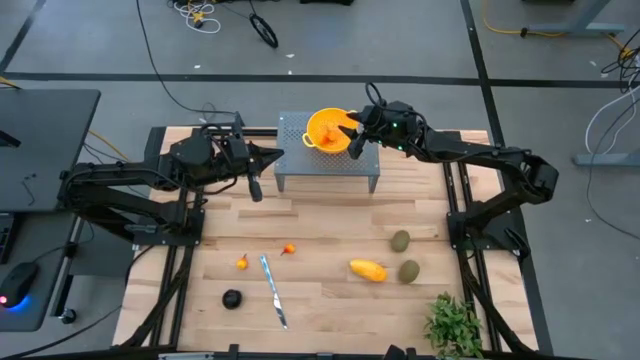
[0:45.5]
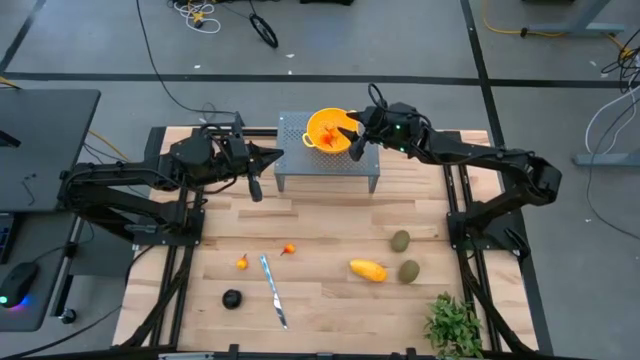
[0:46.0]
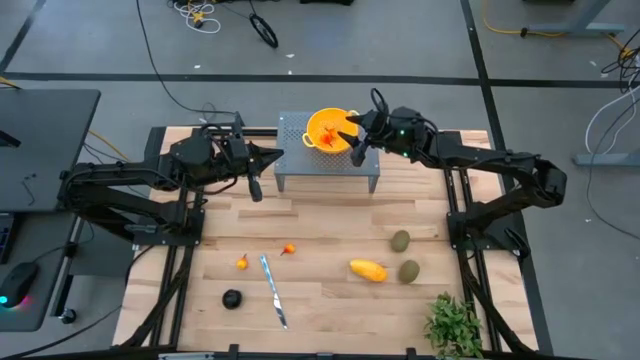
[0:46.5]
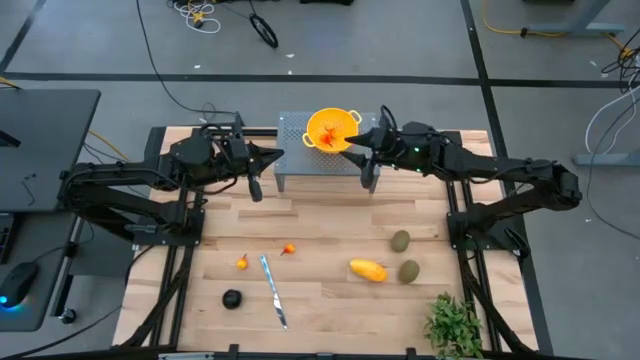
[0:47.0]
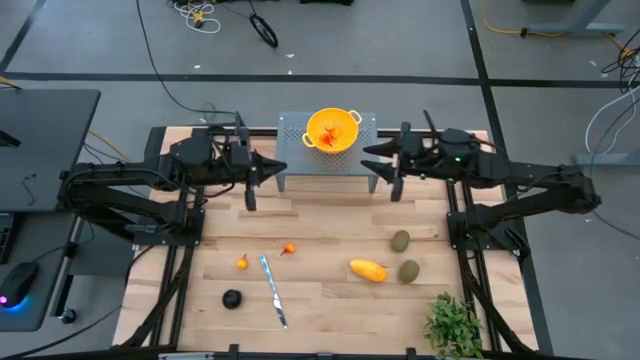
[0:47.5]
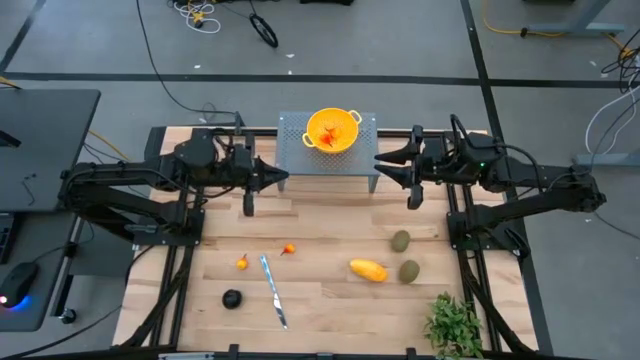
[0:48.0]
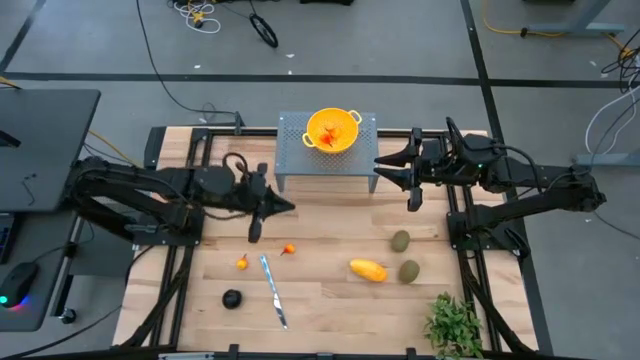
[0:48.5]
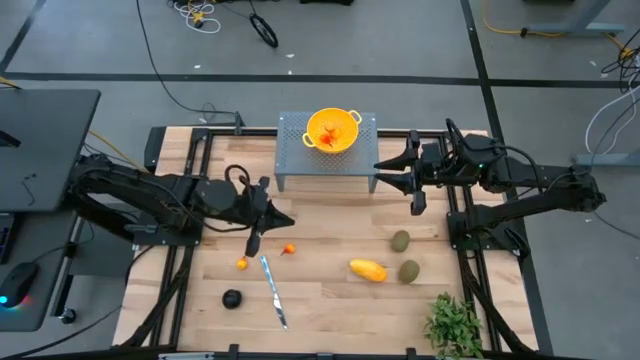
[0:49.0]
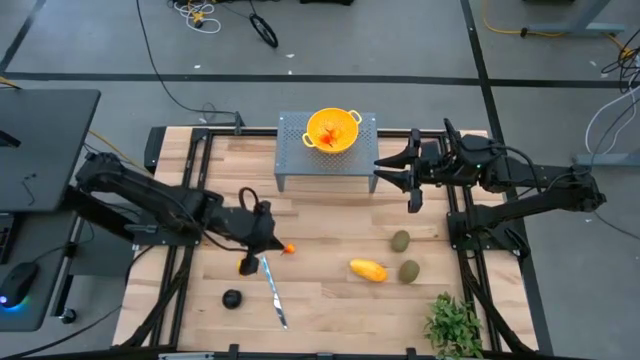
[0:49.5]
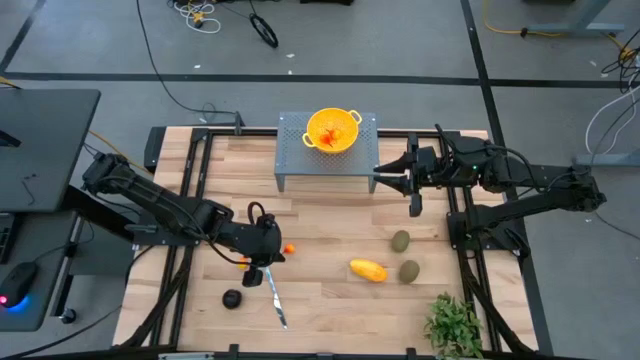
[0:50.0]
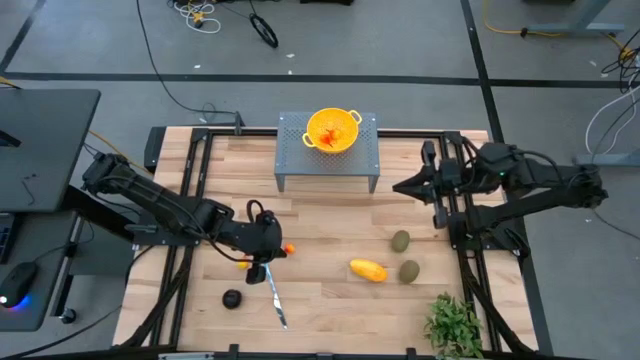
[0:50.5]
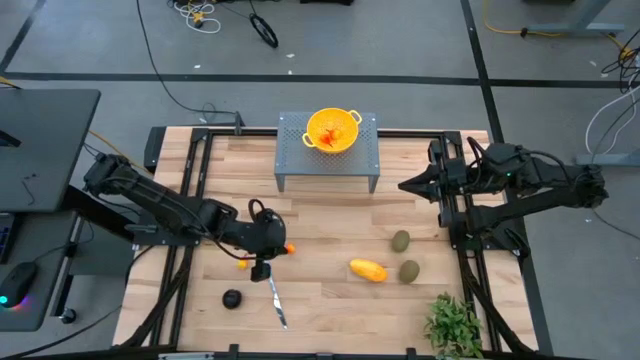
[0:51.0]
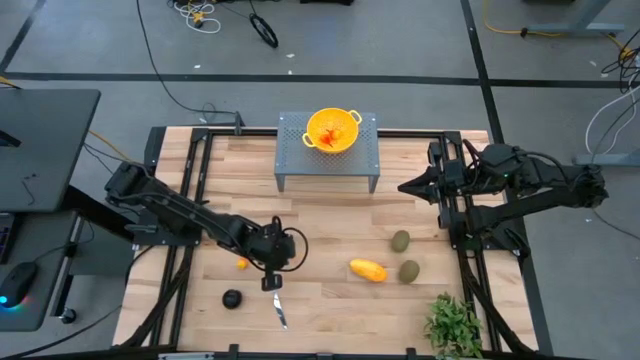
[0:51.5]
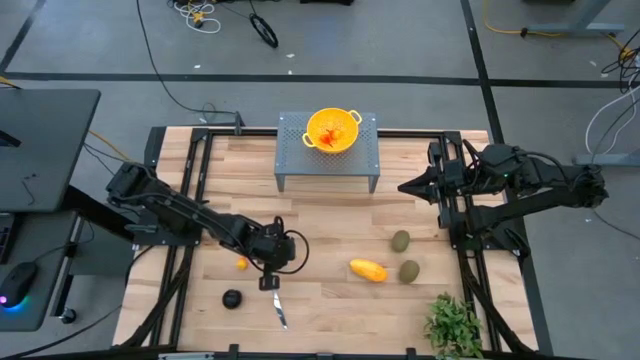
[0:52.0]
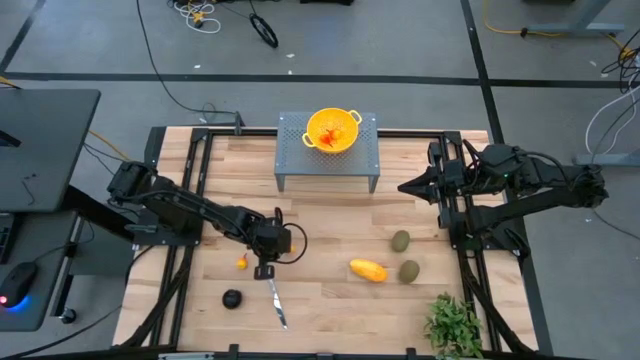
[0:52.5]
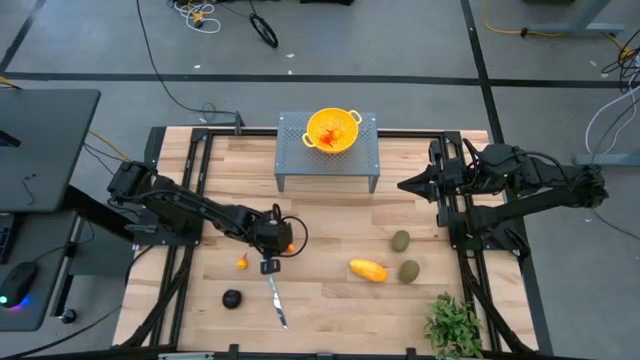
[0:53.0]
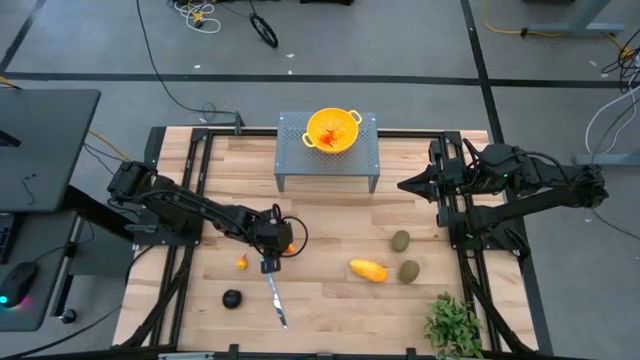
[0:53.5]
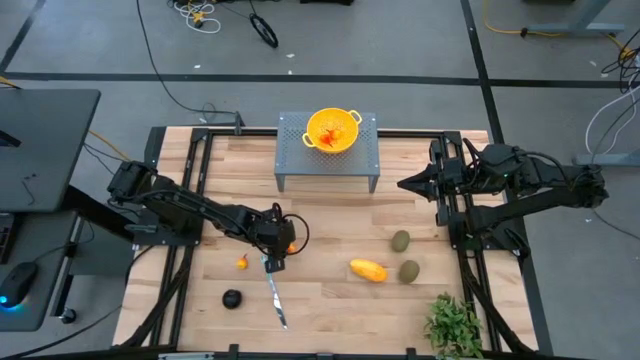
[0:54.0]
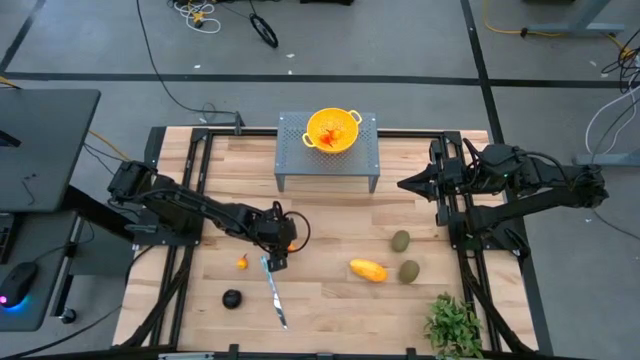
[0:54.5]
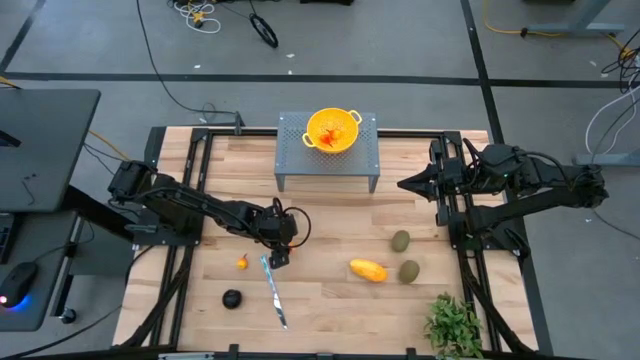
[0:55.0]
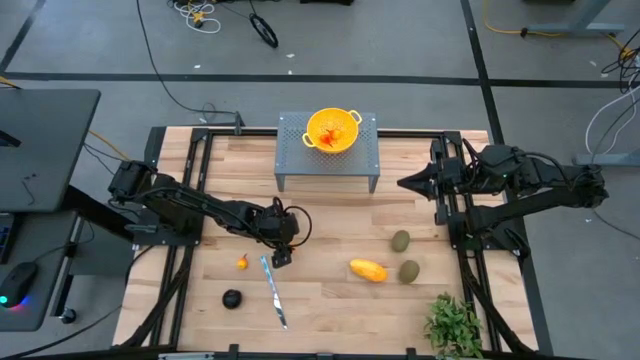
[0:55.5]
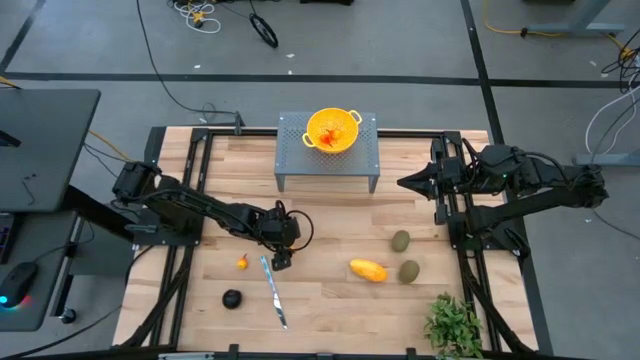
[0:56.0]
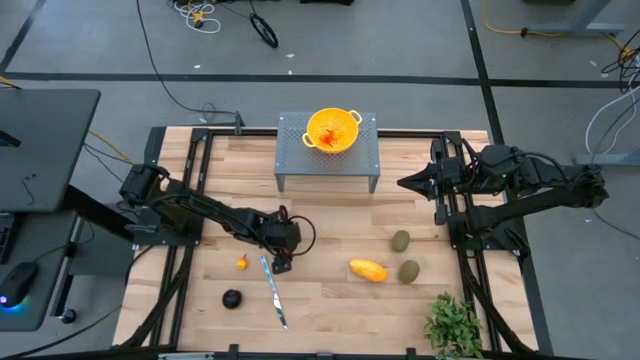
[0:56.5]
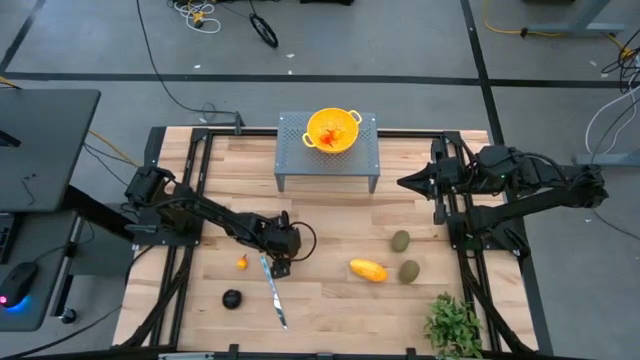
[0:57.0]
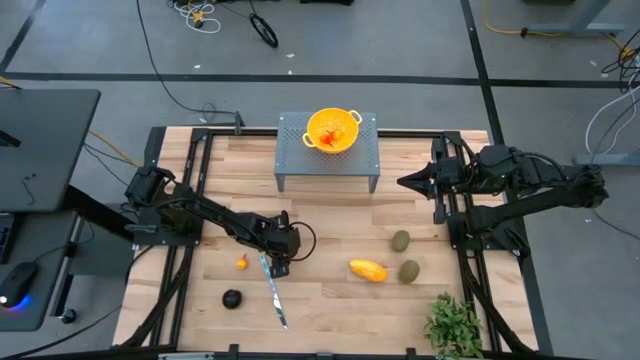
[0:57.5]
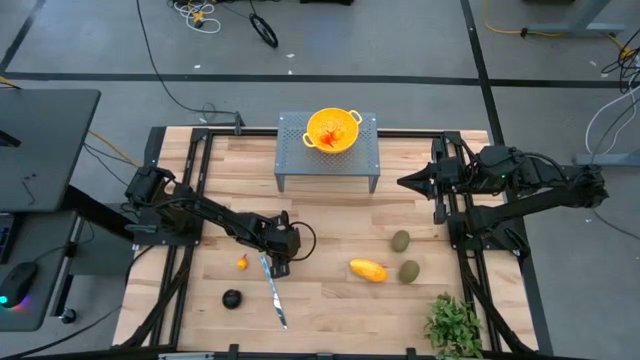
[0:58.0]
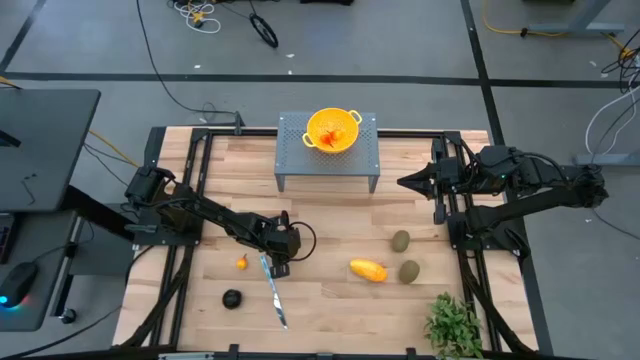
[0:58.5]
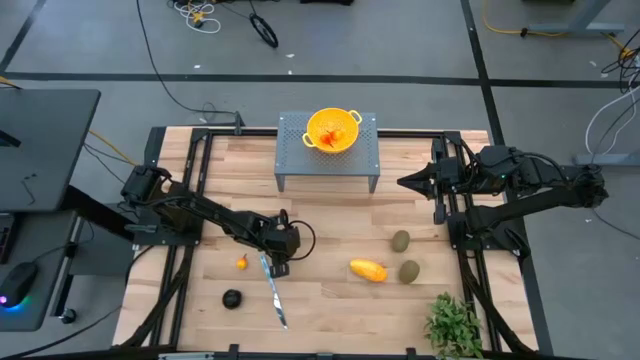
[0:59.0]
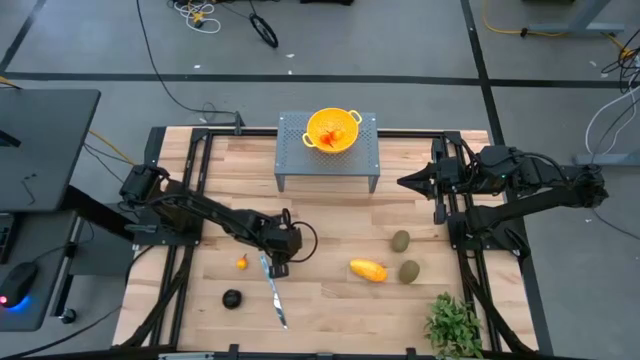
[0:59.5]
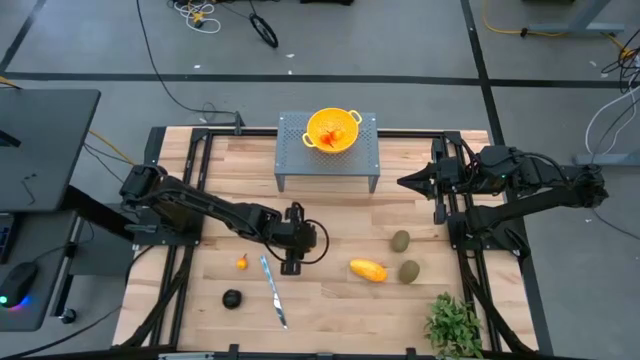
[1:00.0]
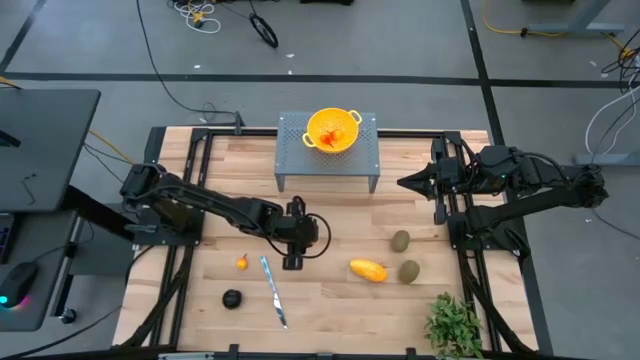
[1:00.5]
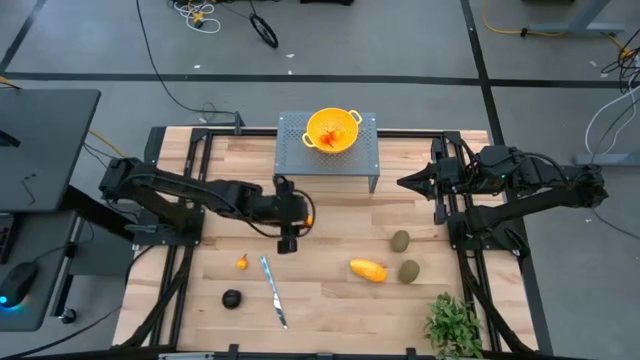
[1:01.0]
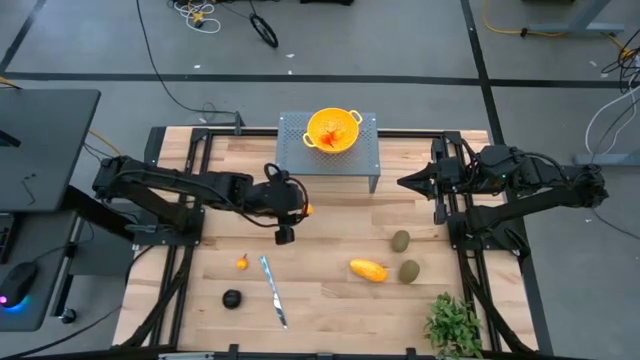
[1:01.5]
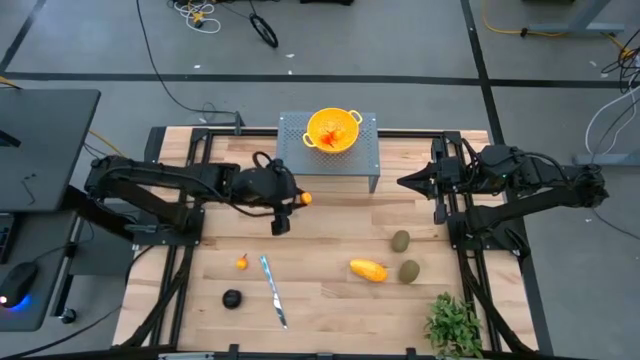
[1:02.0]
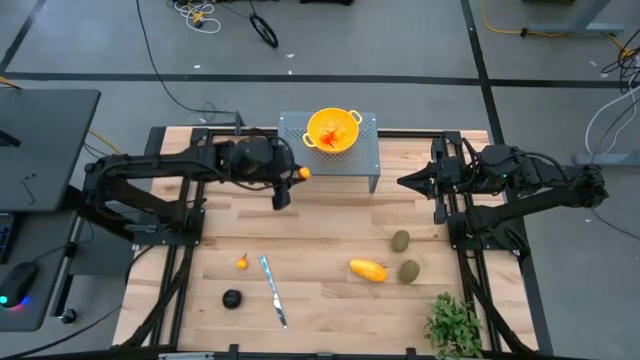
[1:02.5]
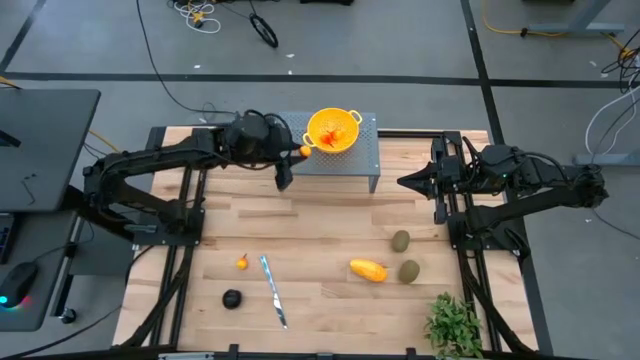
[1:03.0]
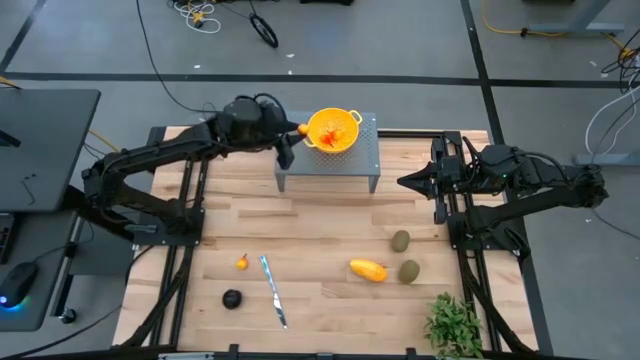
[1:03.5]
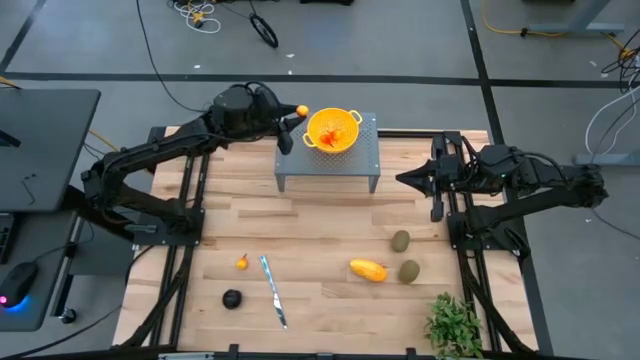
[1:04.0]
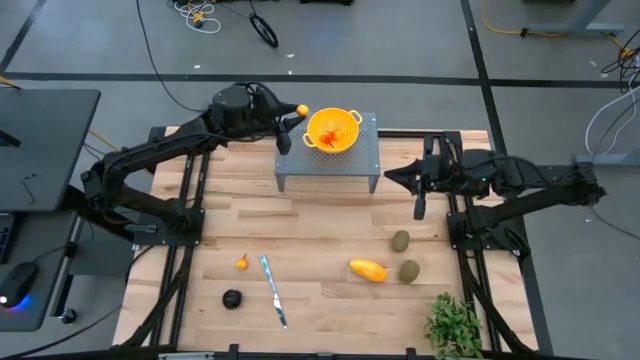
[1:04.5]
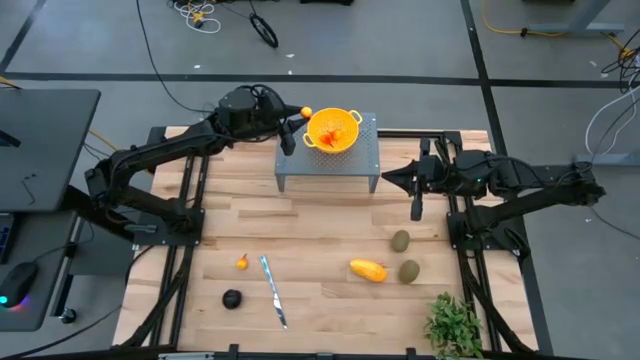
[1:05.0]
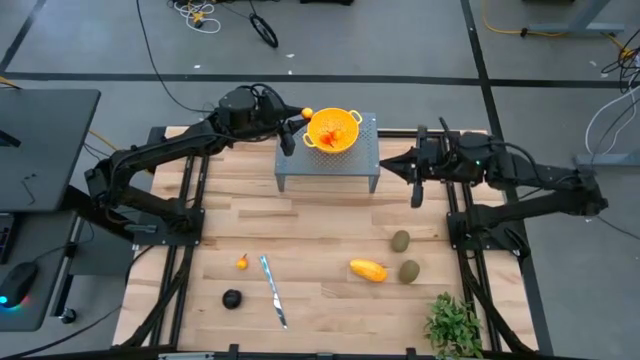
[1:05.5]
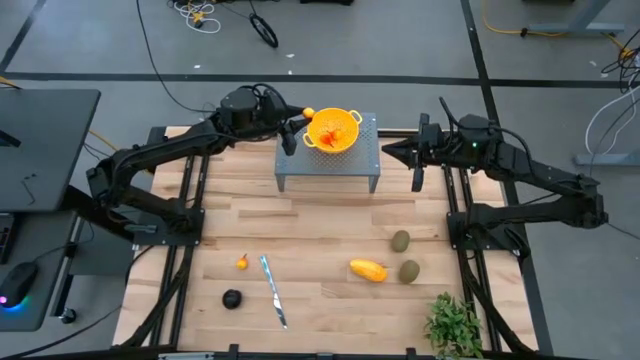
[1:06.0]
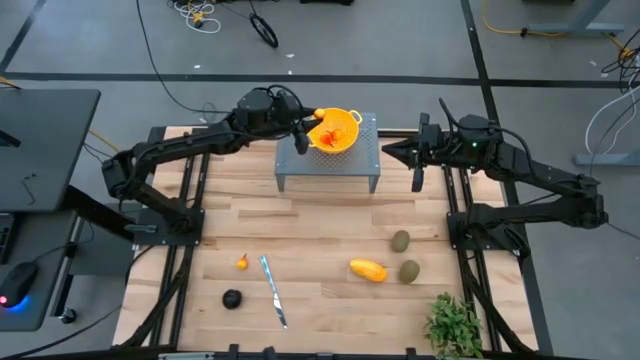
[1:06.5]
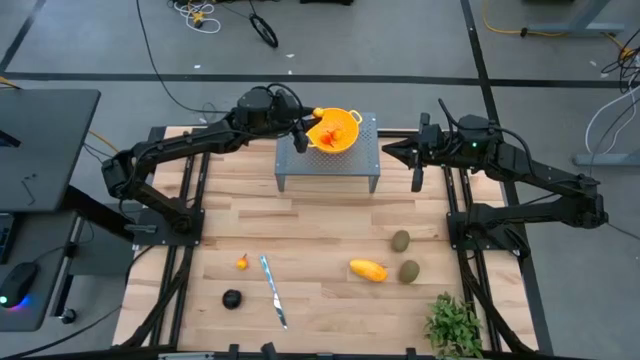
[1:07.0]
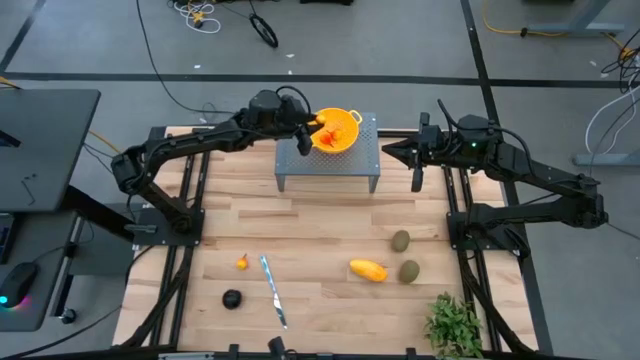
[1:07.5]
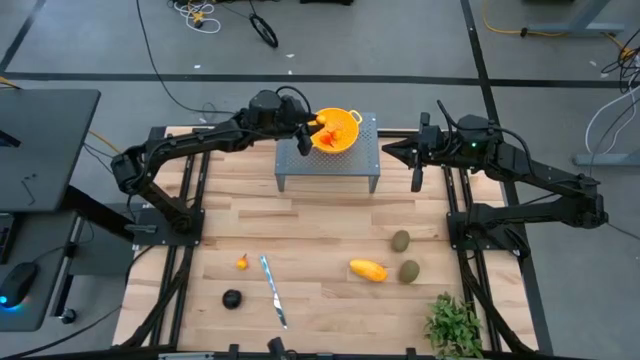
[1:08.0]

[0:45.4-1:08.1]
Task: Pick & Place Fruit
Put the pear into the yellow colander bowl on the shelf
